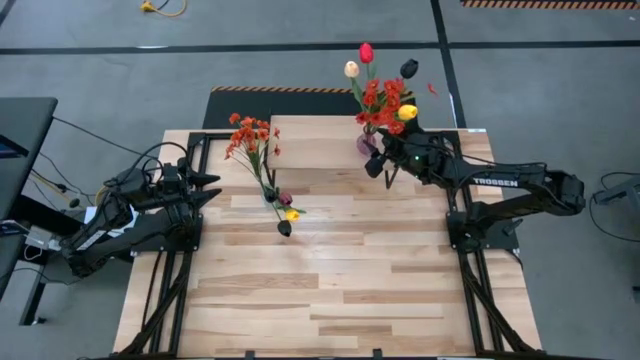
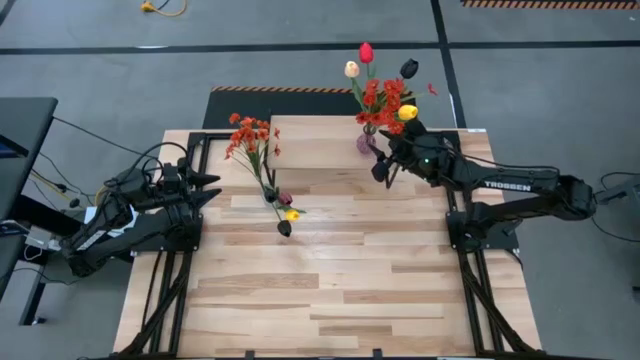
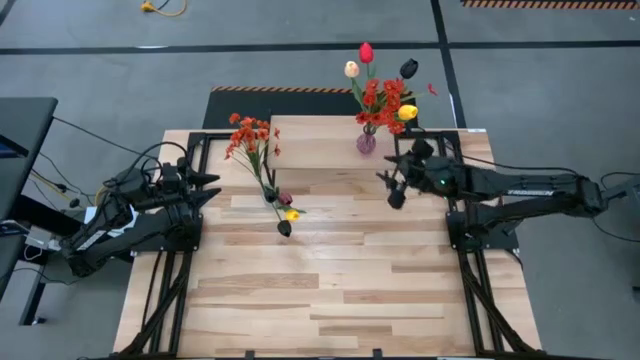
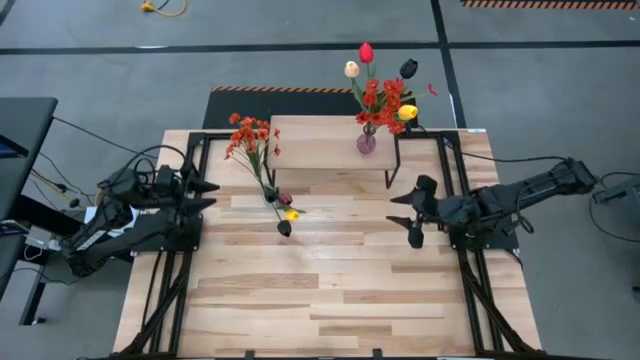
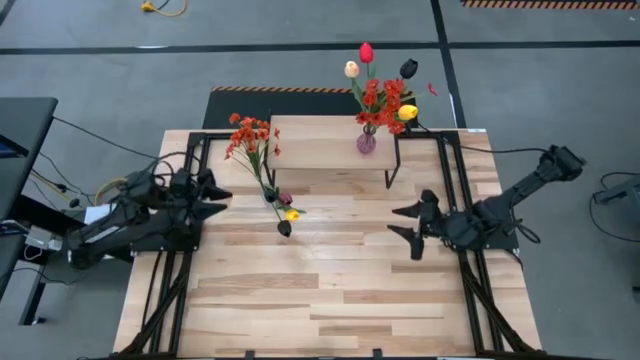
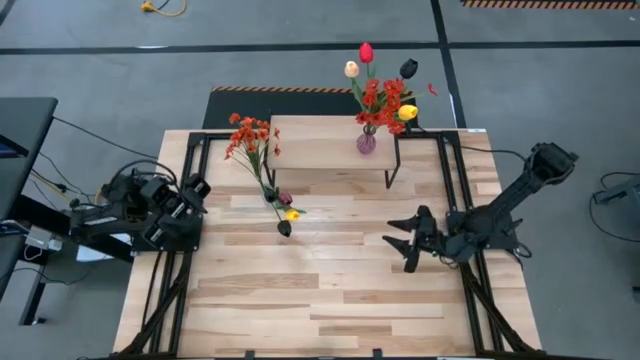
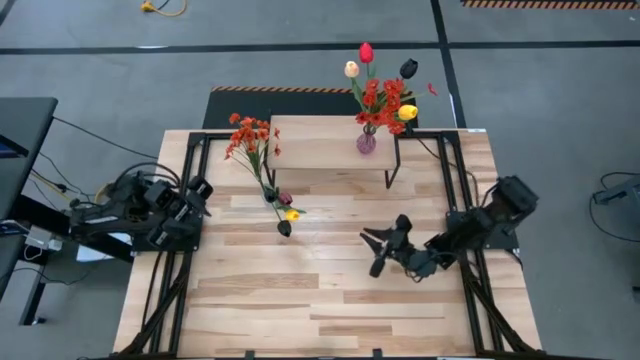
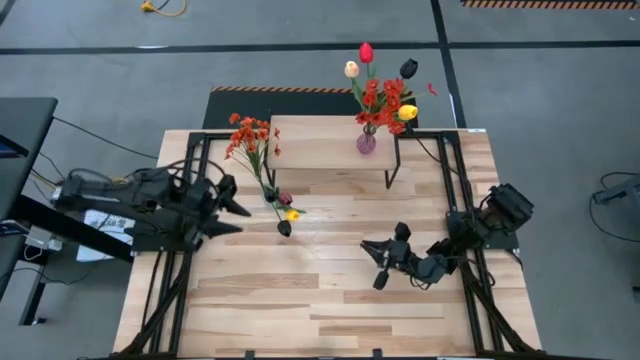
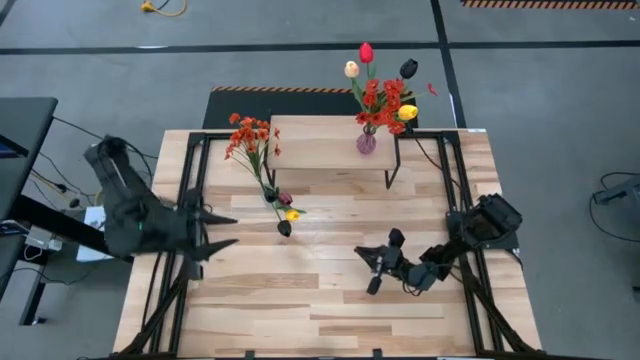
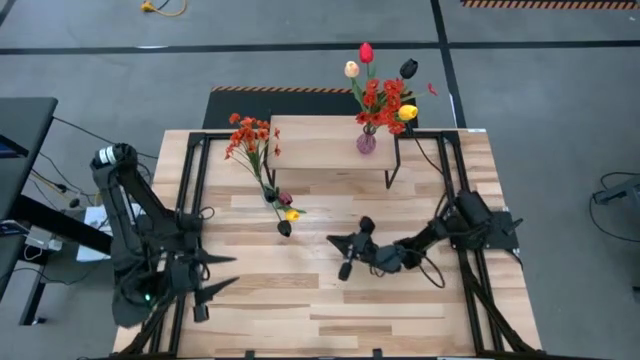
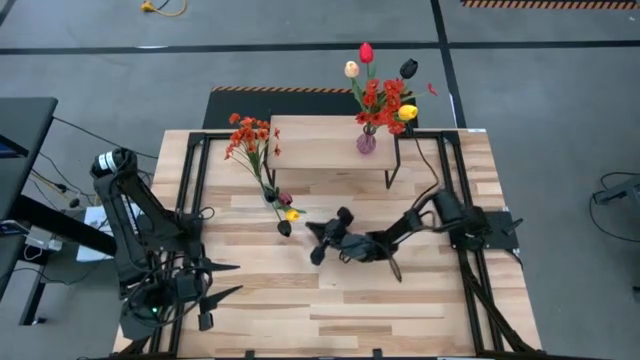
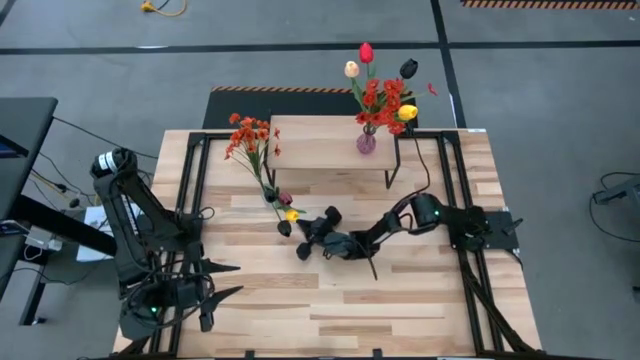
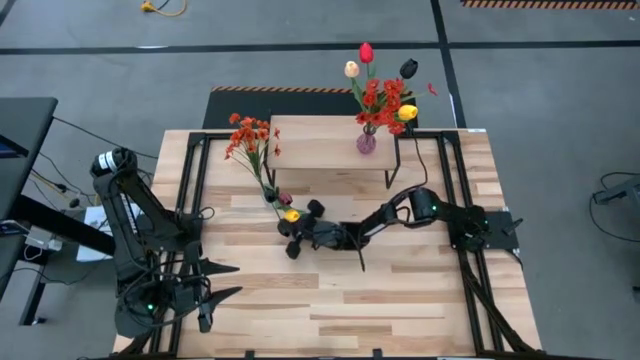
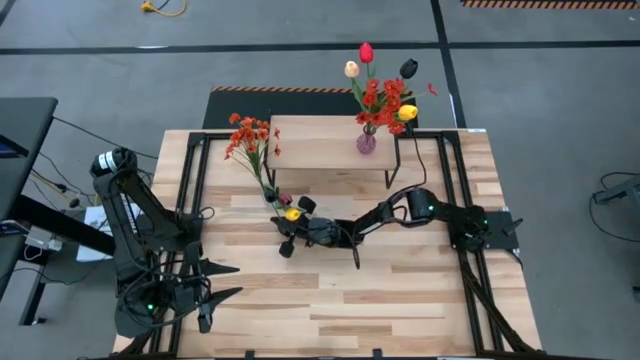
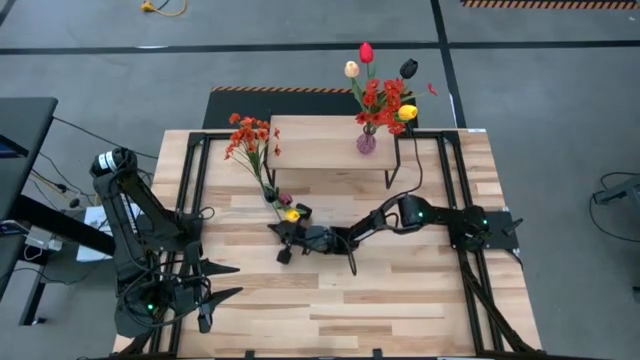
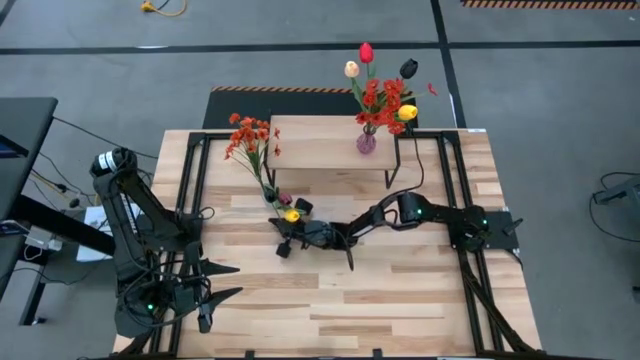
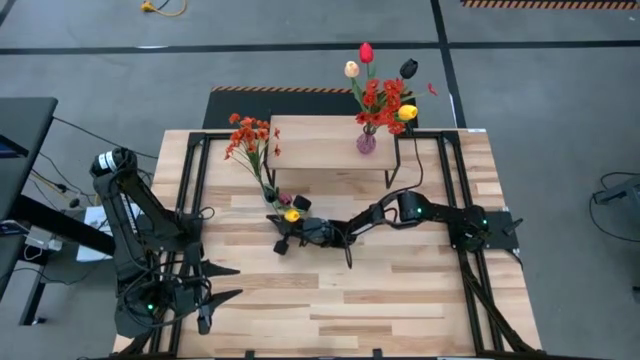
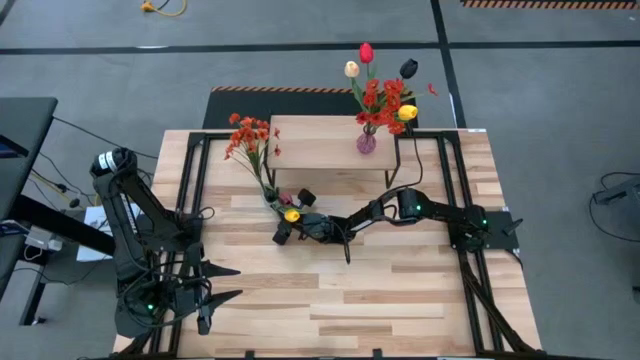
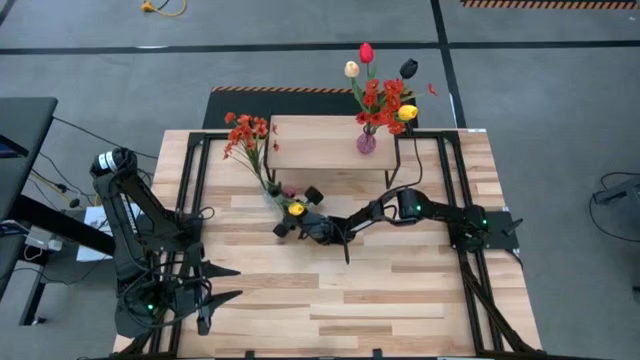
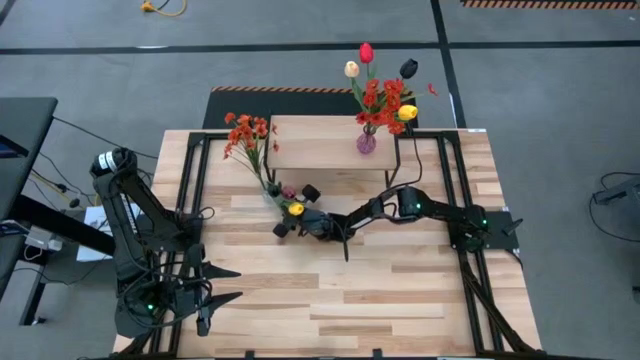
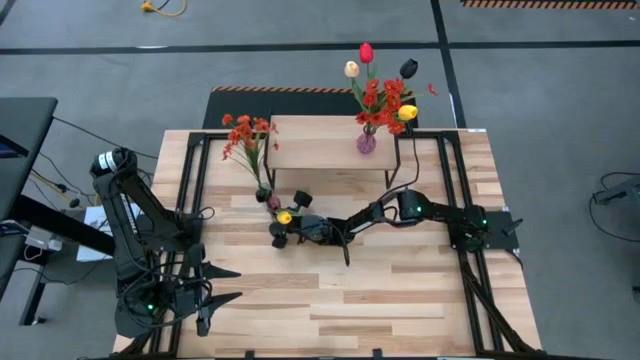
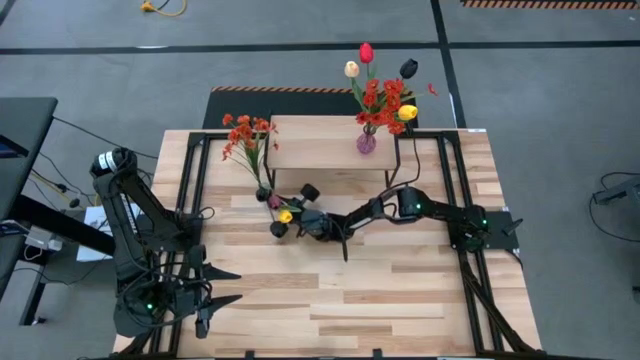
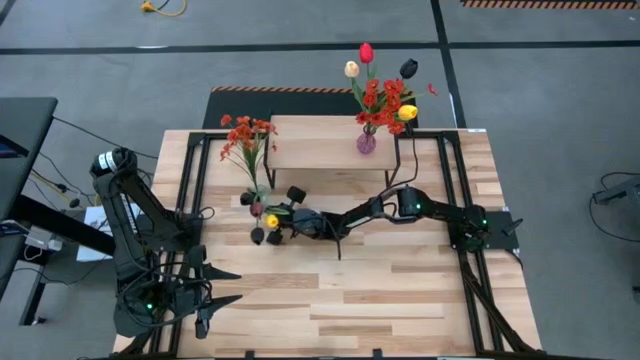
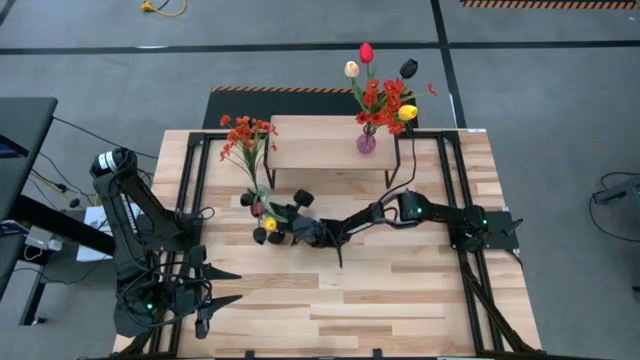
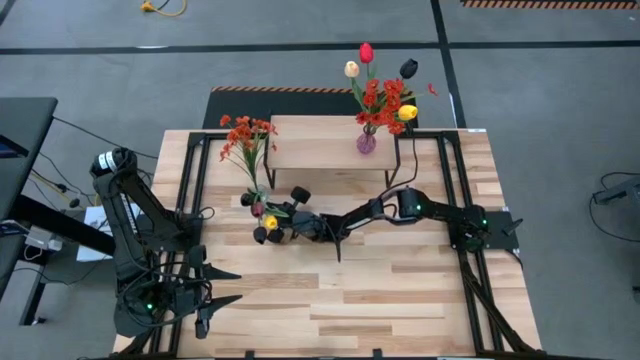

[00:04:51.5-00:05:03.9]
Task: Pick and place flowers into a vace then onto a shelf
Adjust the transparent vase with the flowers on the table

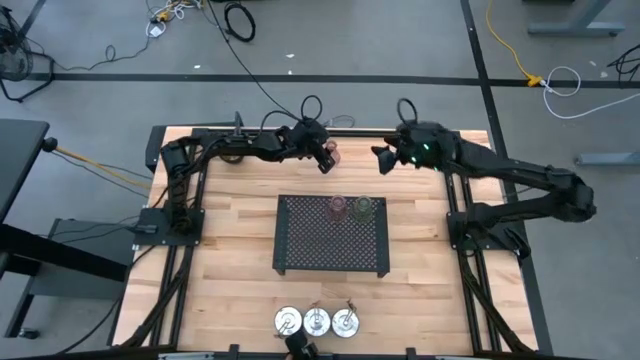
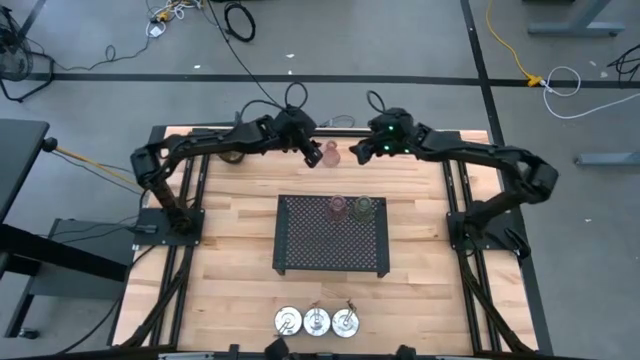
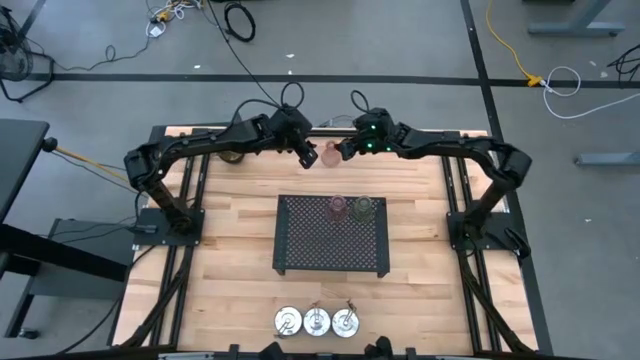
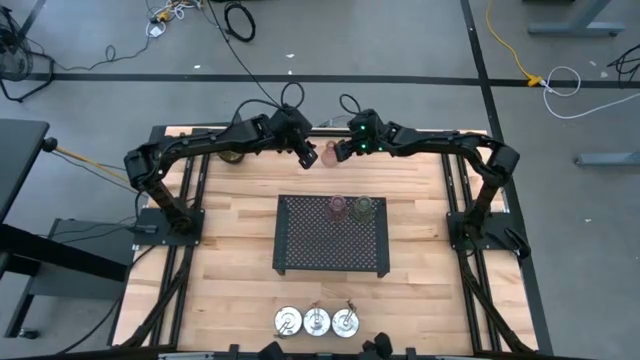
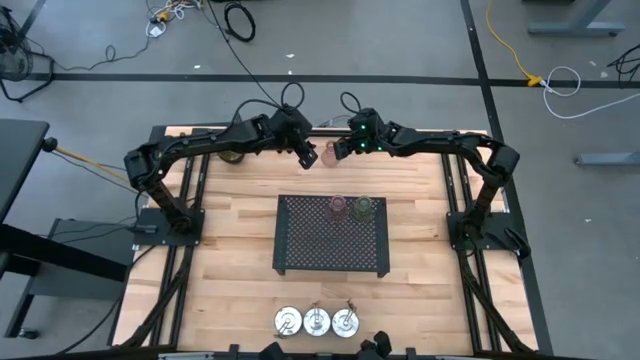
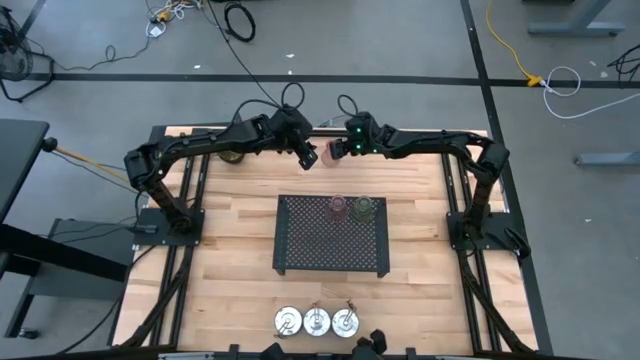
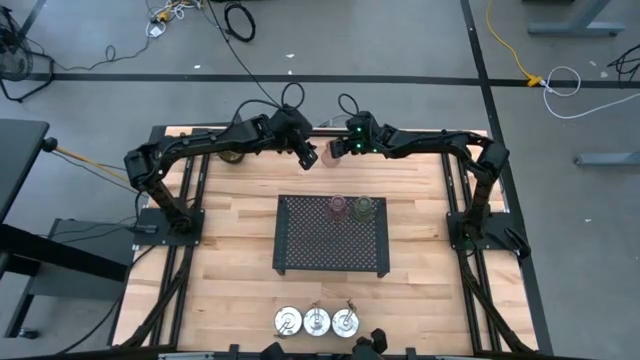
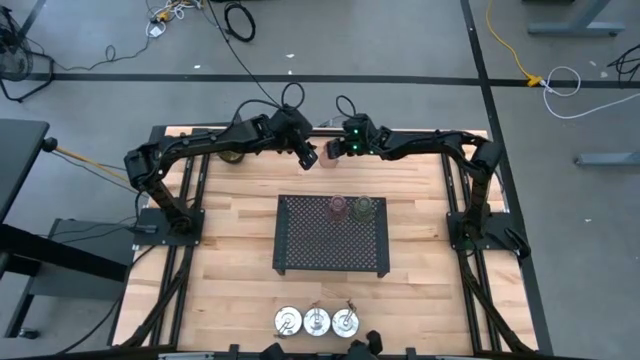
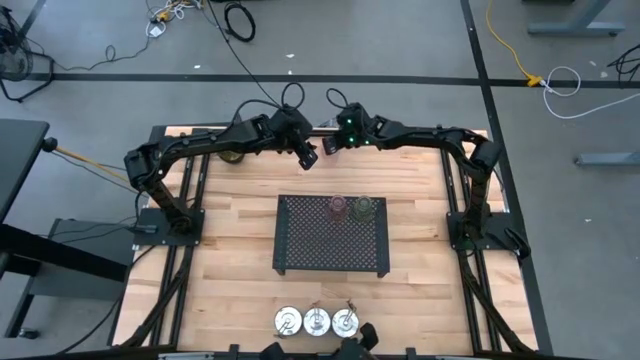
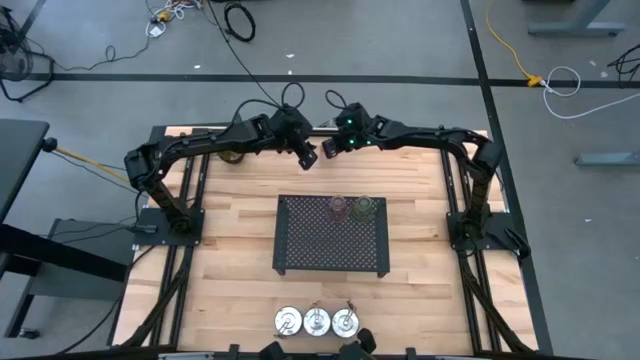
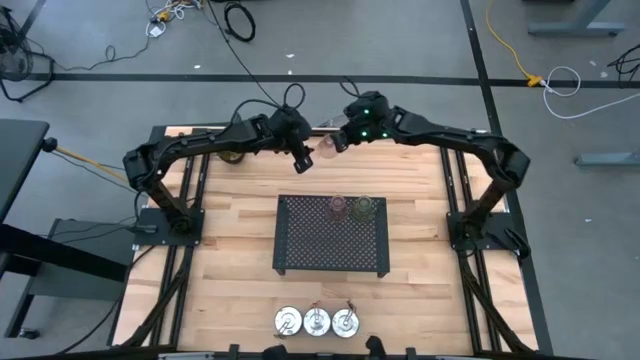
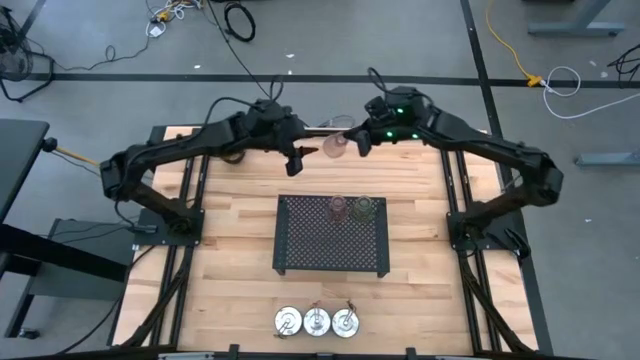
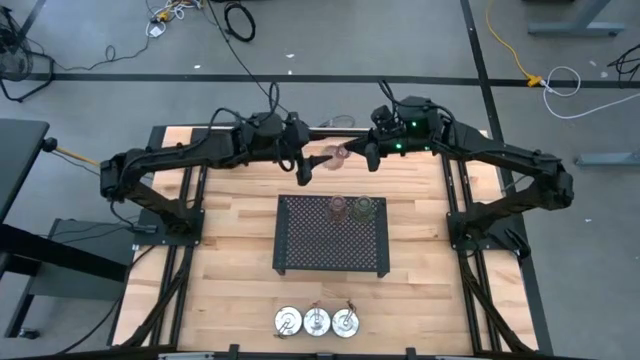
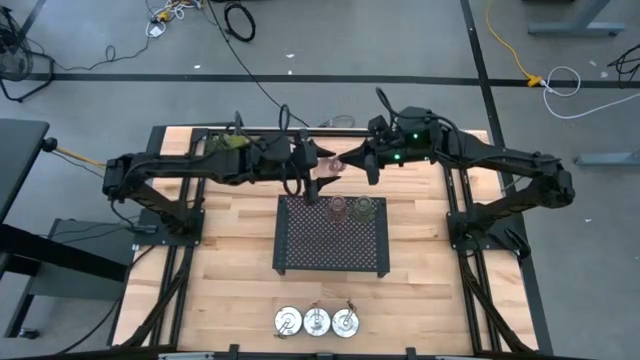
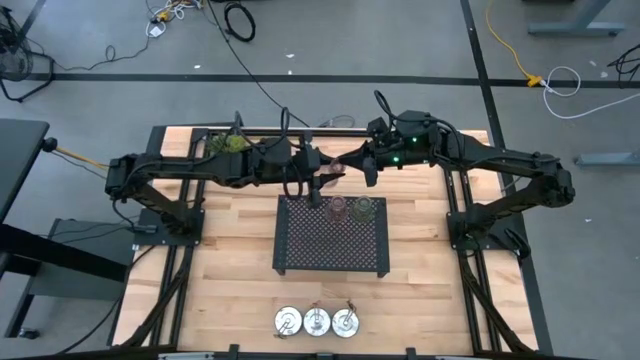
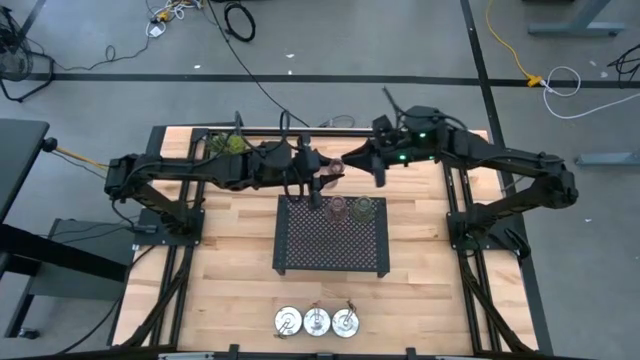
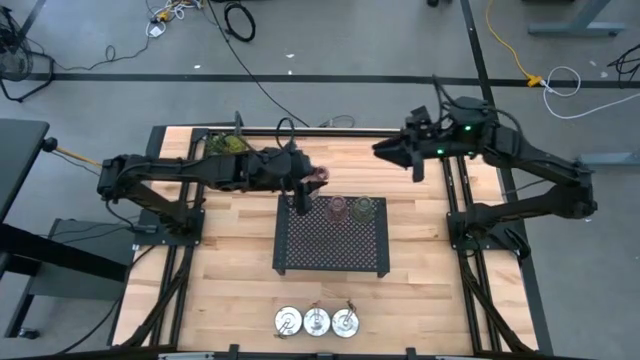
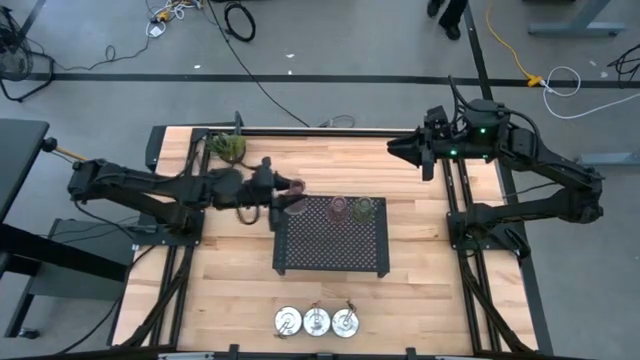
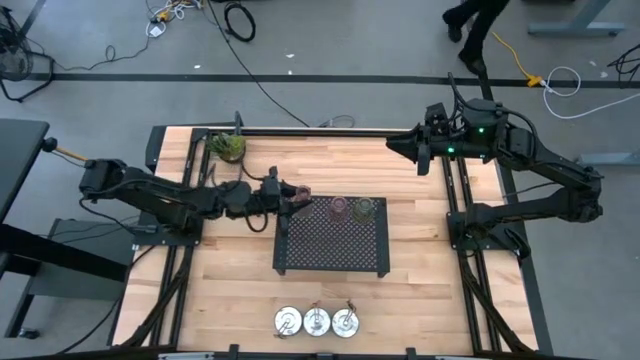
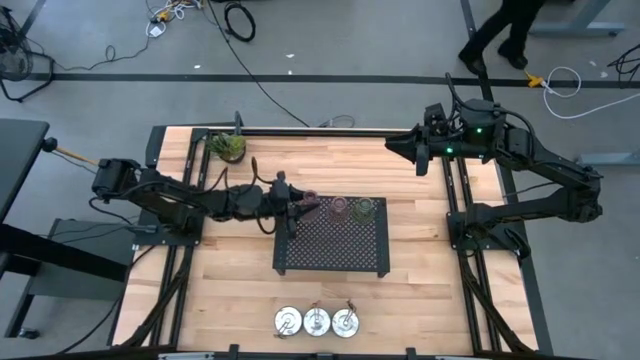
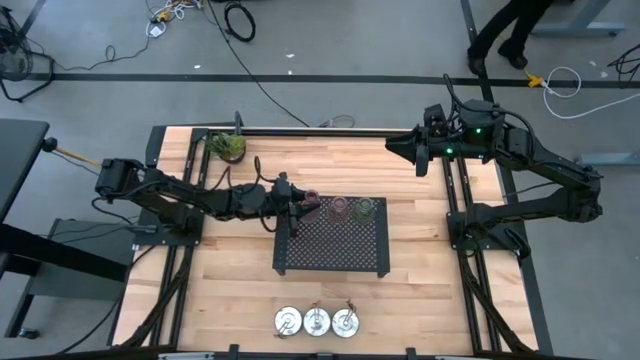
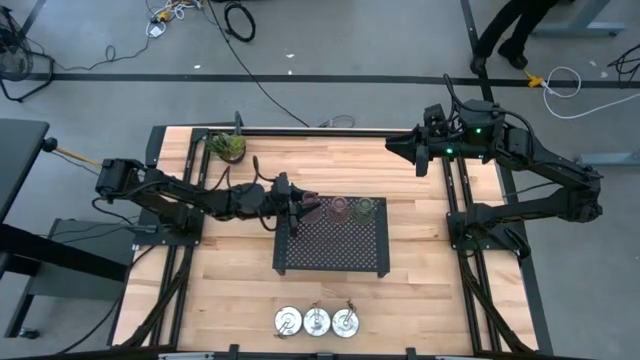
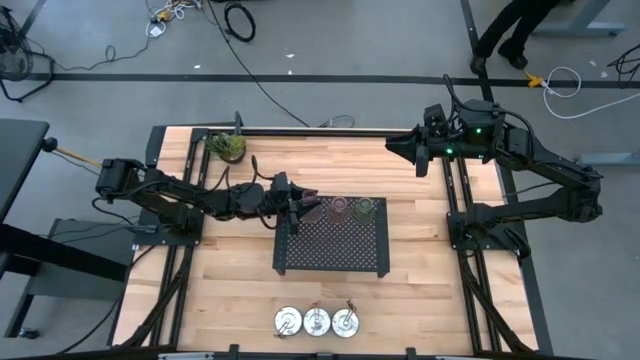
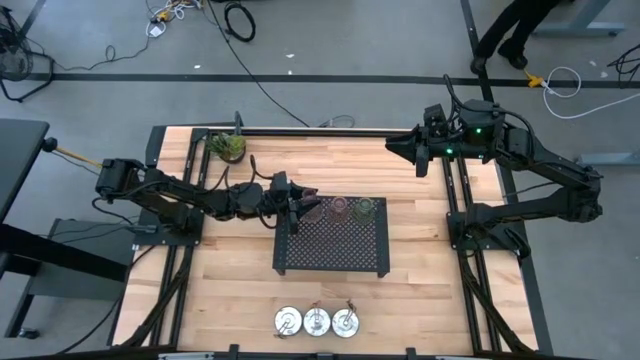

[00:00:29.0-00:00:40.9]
Task: Pick & Place candle stick holders
Put the pink glass candle holder on the shelf
